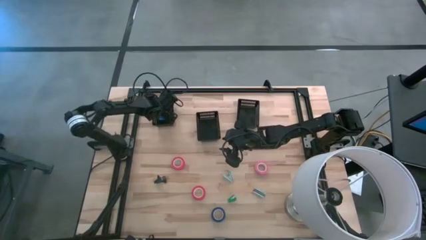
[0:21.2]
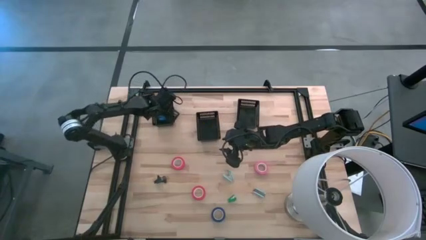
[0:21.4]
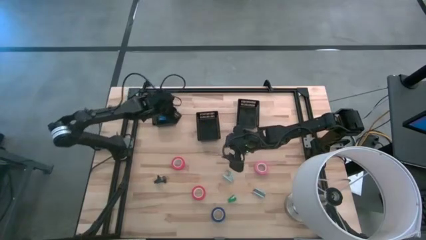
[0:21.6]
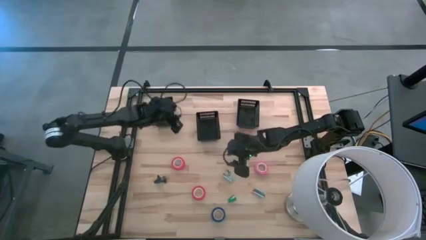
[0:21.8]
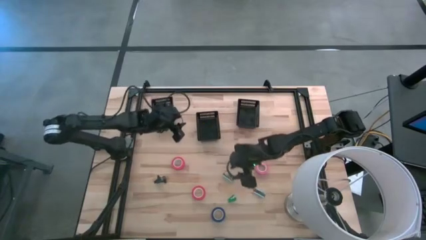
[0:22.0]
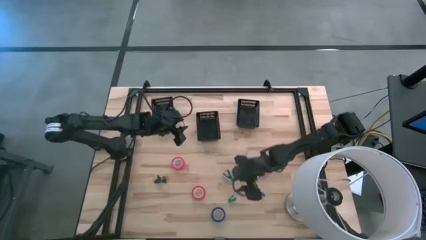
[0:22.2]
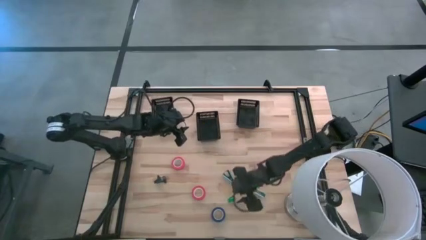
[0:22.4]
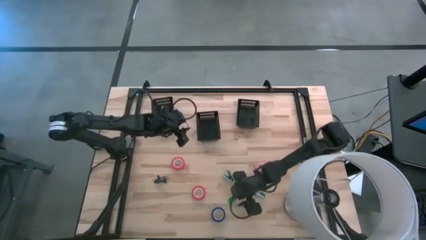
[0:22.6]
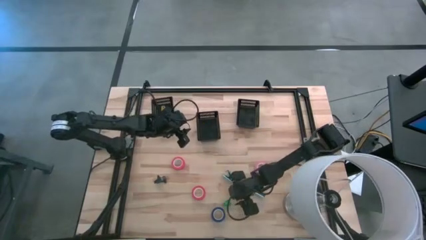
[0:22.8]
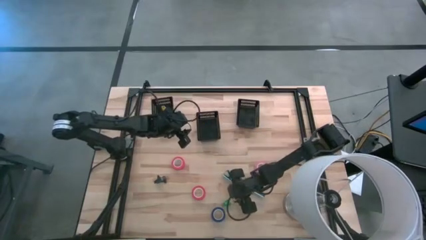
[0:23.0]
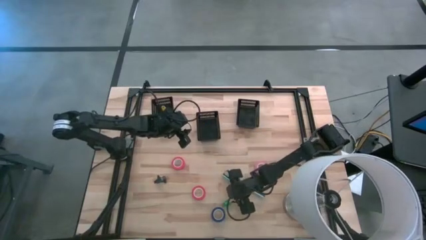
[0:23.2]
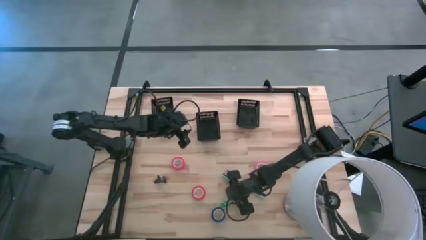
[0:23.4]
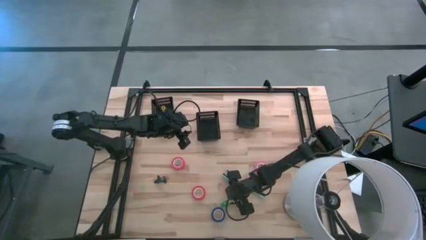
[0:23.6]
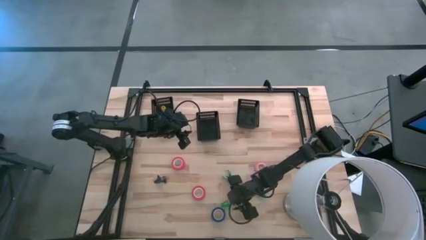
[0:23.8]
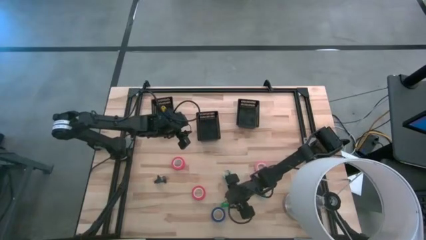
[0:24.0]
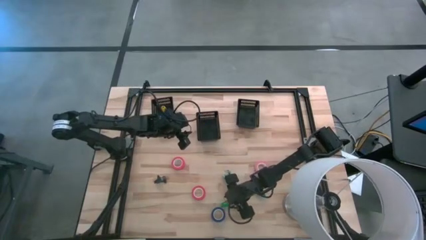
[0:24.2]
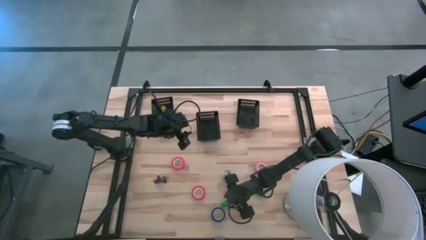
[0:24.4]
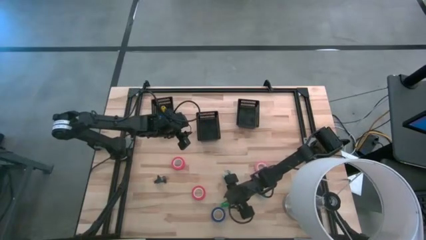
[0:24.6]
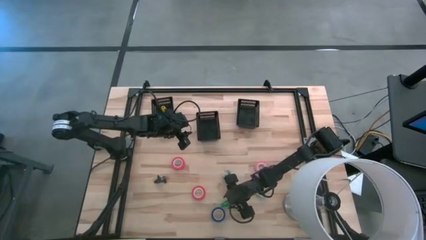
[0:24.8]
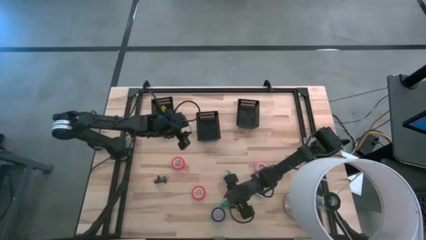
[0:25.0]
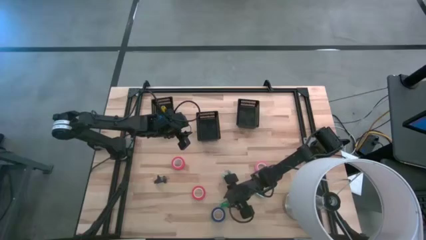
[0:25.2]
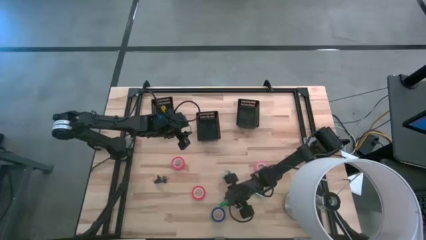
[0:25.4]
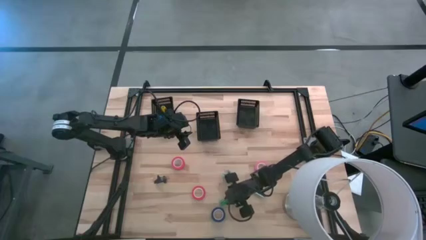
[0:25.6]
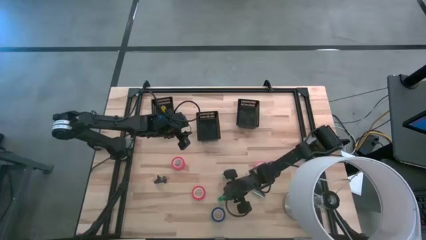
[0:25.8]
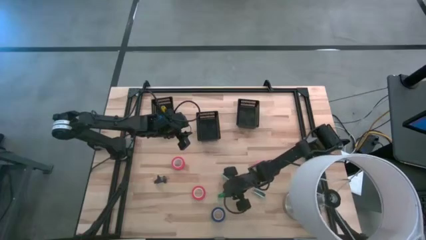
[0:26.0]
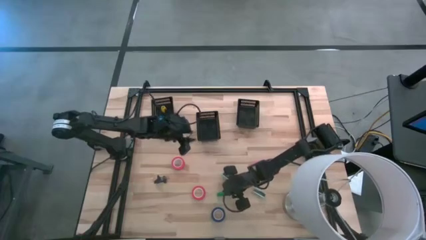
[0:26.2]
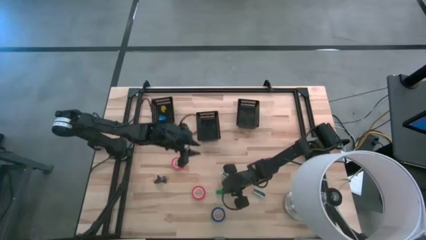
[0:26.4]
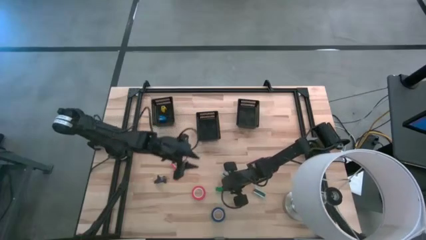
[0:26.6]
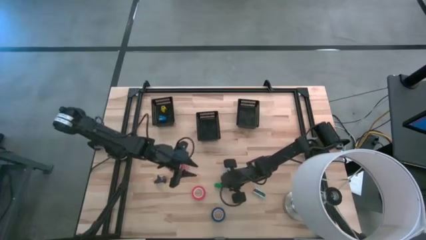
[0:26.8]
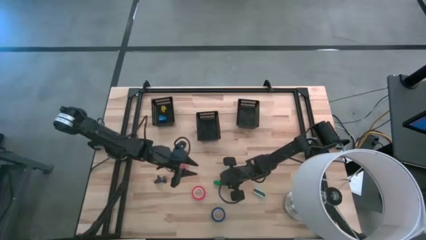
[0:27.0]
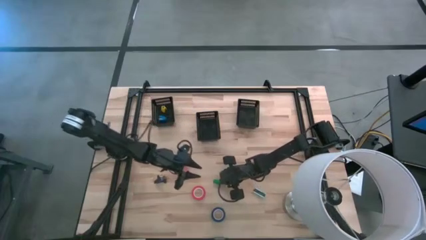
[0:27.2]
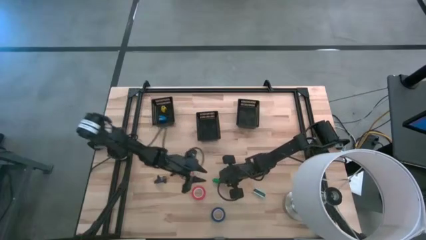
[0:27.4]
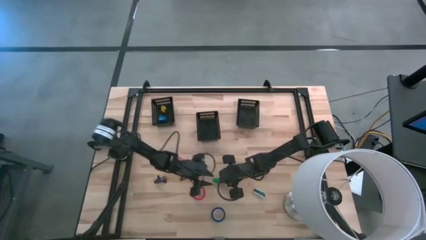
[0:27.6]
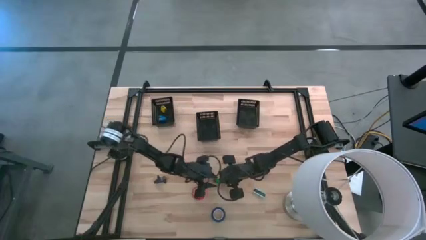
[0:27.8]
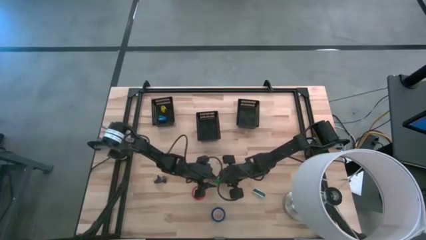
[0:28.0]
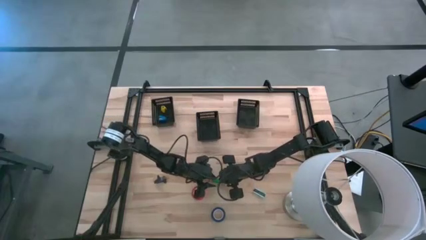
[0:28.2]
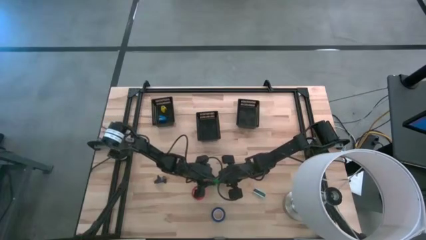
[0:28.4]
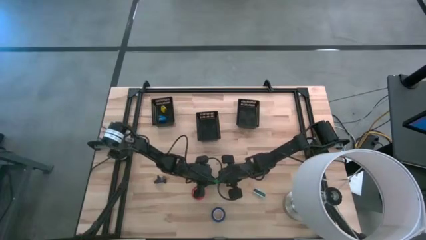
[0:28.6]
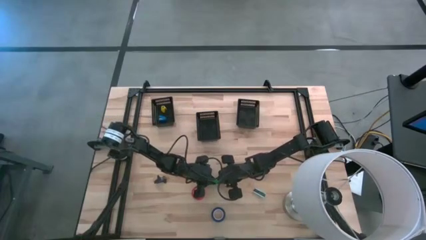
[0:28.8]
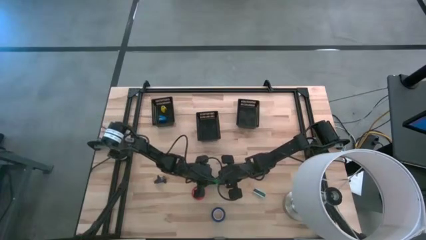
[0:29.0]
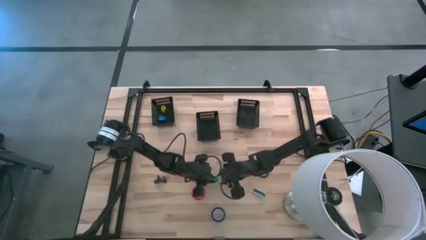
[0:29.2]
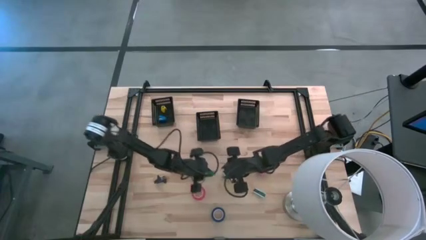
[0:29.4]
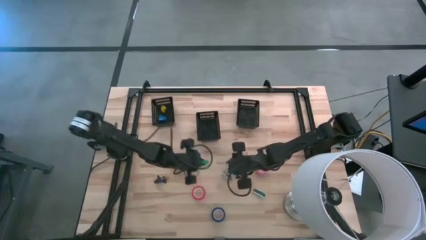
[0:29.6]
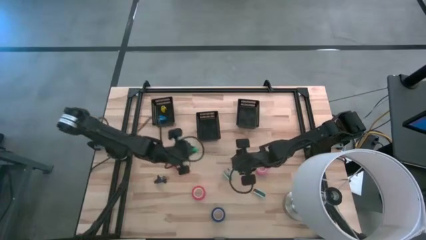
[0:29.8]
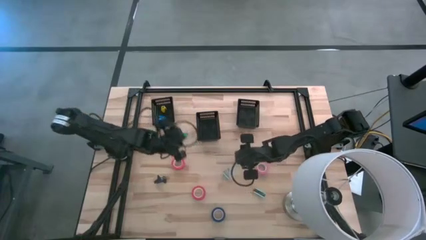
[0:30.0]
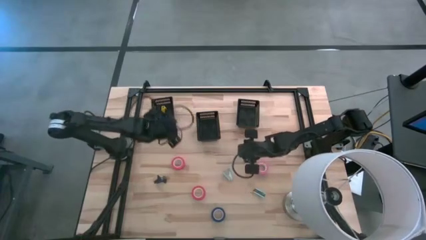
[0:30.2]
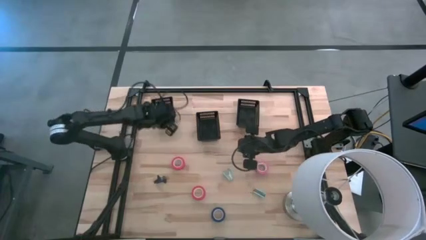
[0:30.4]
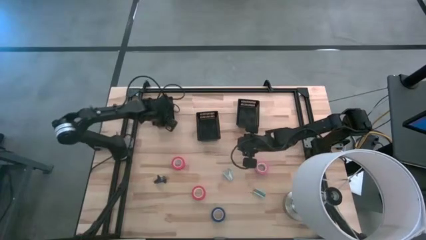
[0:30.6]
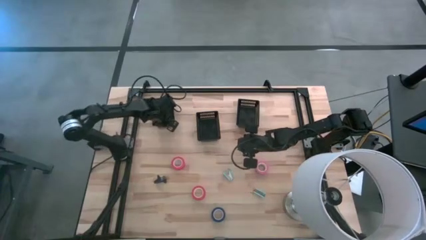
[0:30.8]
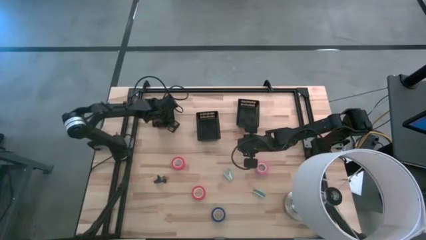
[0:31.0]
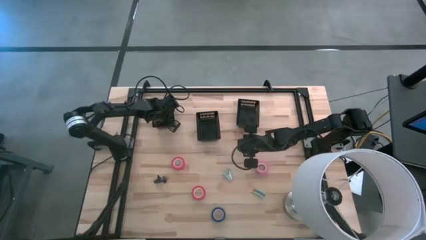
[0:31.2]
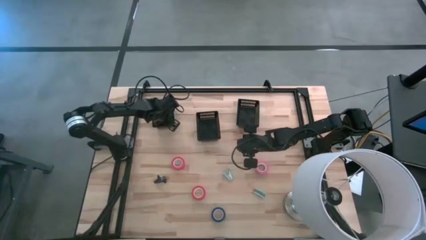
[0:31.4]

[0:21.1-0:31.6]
Task: Pick and place Stapler, Stapler remover, tape
Put the green stapler into the left black bin

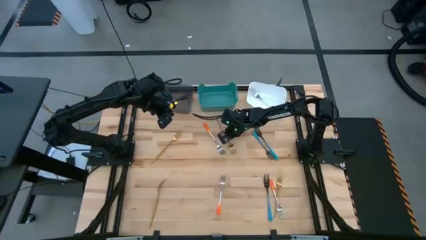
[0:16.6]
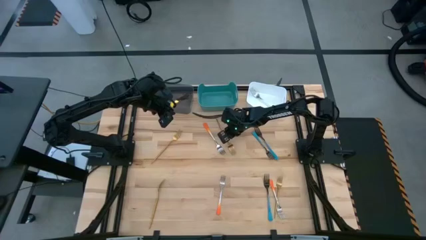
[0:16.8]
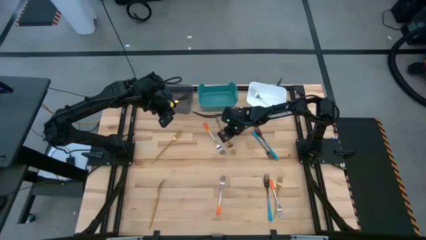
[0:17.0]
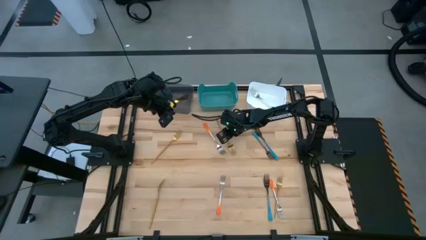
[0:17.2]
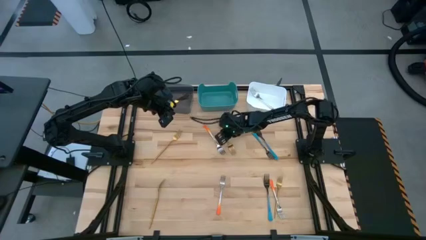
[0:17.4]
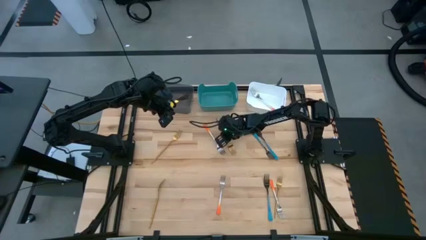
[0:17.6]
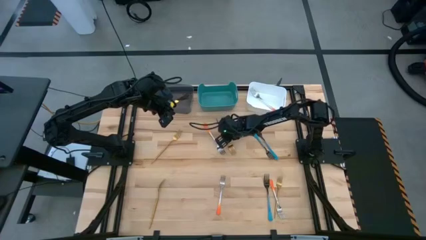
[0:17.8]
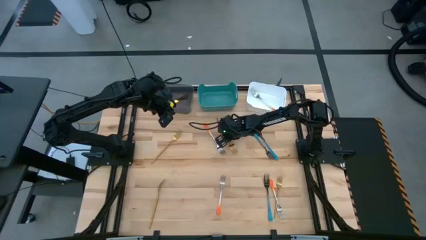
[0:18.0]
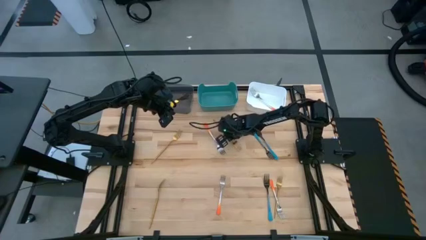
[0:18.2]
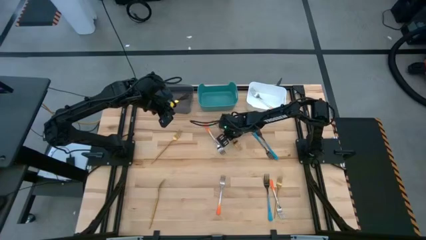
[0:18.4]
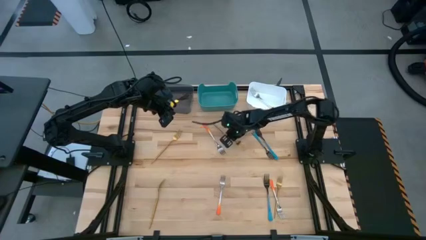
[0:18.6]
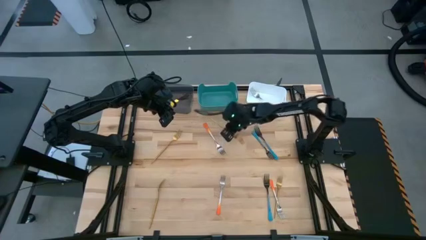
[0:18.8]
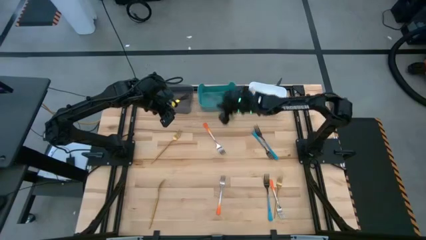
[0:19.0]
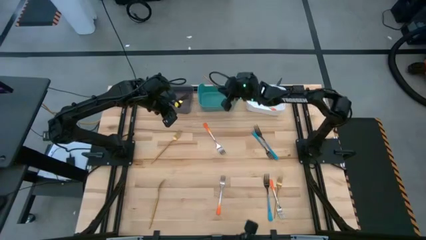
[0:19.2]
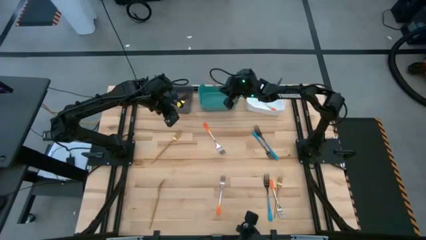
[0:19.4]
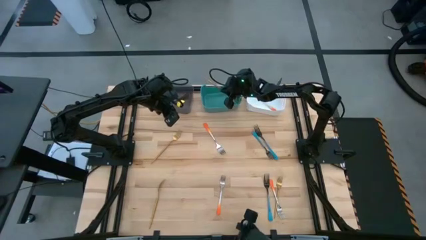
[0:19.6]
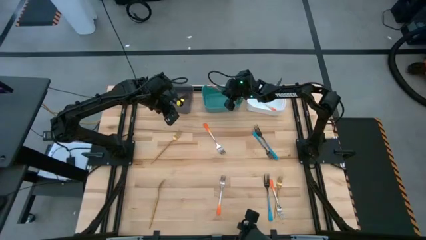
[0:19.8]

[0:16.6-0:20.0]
Task: Sort silverware by color (type)
Put the gold fork into the green bin
